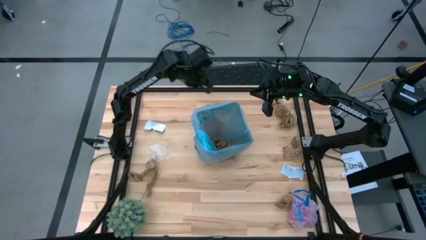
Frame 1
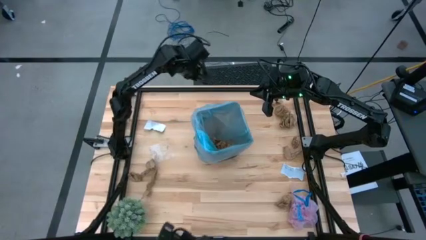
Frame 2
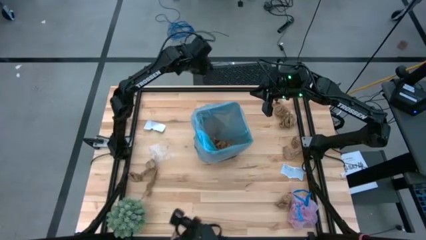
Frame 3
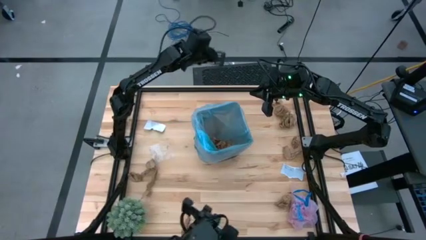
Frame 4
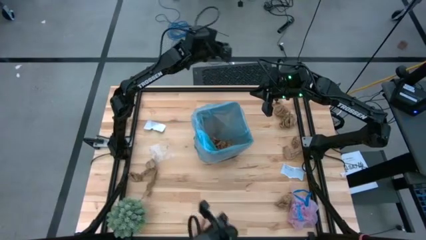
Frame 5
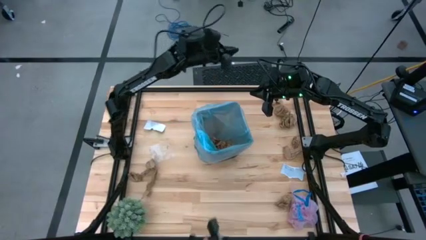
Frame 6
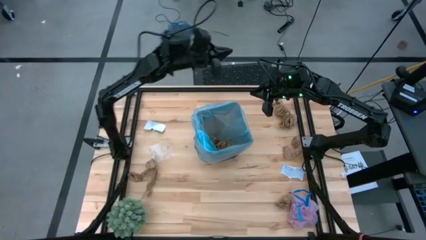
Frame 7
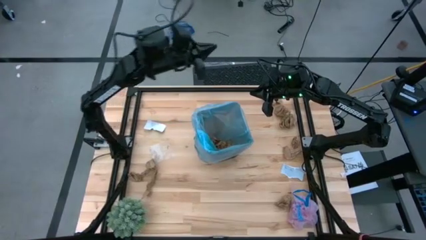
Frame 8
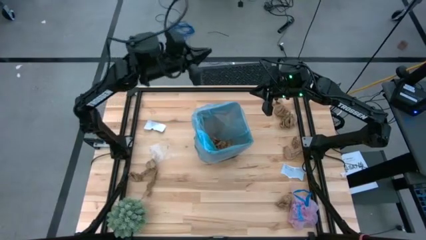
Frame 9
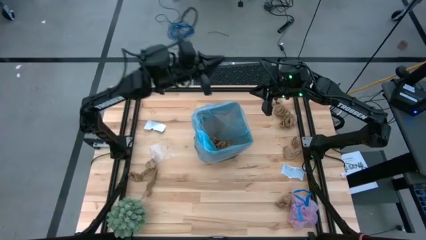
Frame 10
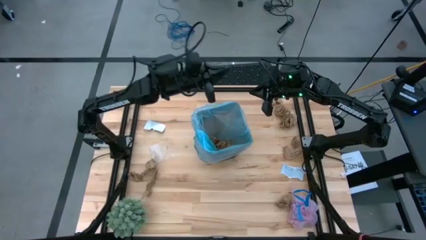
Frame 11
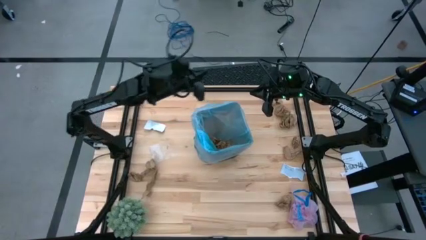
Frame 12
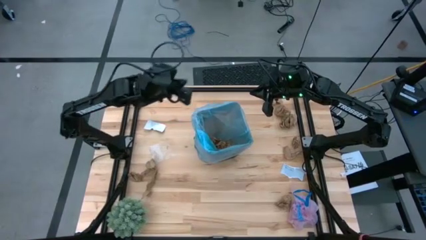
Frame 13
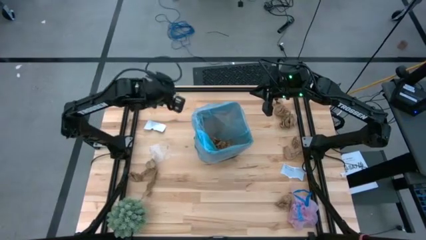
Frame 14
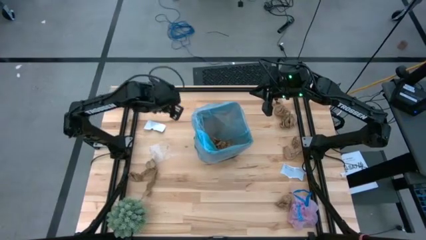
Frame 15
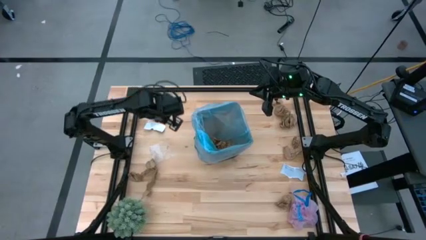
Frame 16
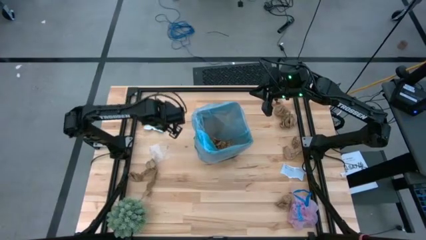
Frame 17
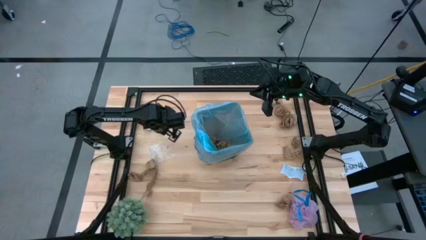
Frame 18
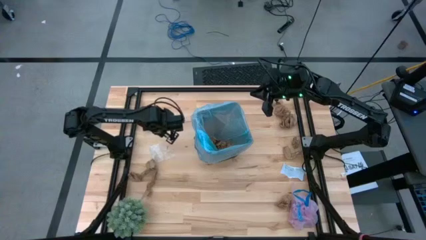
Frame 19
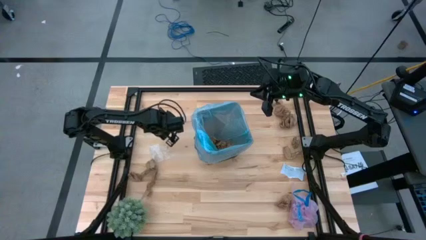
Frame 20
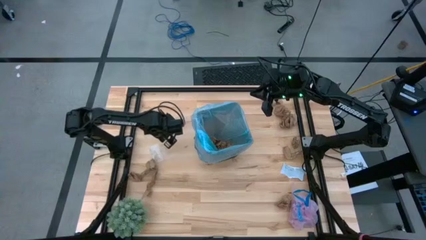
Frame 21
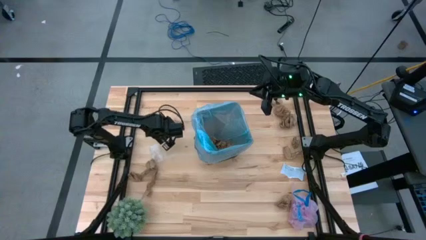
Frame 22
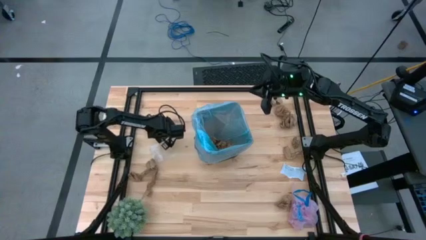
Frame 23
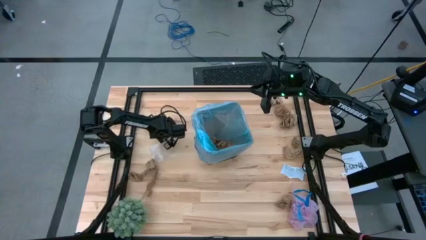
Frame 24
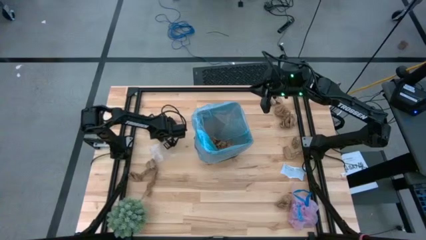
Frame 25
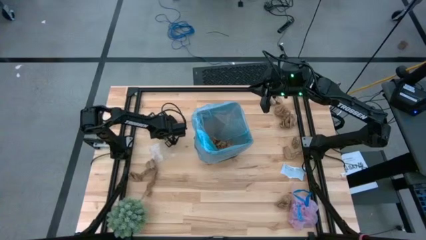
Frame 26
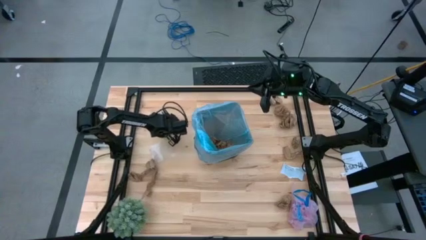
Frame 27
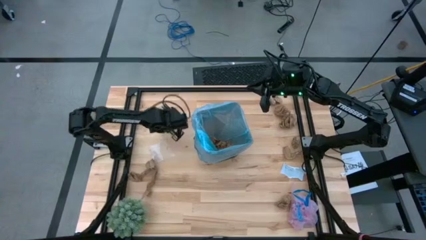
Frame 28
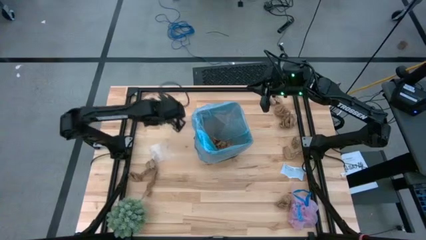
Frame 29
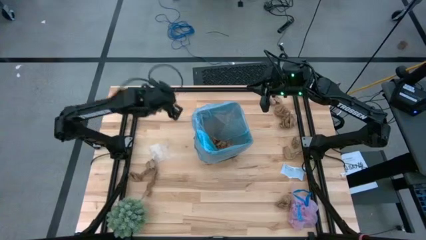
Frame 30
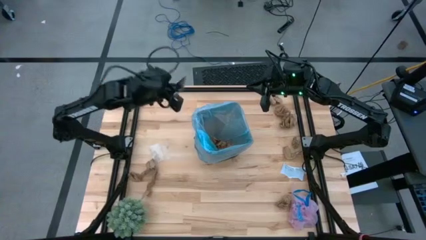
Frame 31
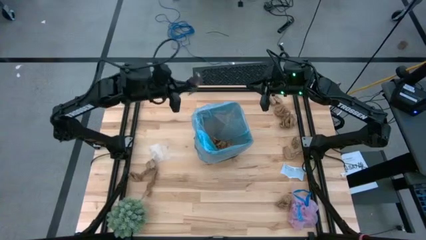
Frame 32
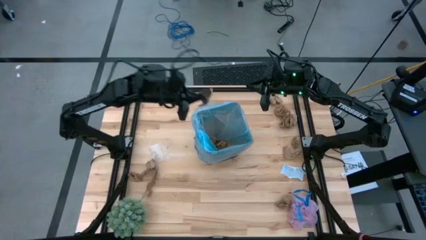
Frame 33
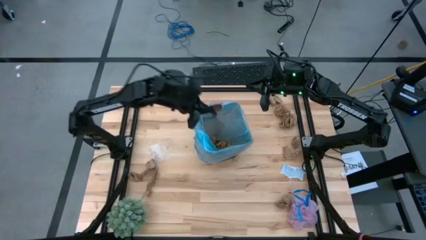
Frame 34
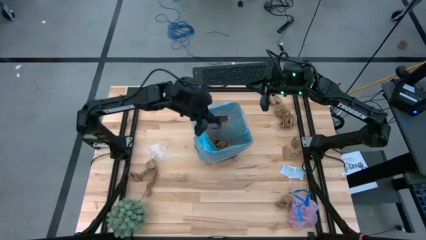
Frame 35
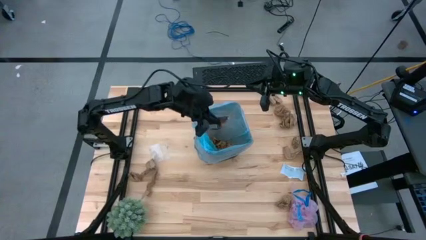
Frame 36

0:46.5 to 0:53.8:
Task: Pick and place trash into bin
Put the white paper into the brown trash bin

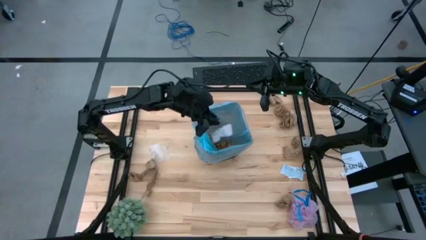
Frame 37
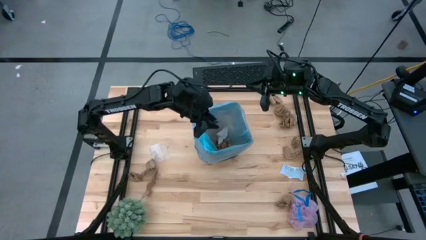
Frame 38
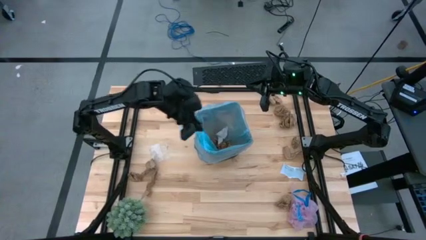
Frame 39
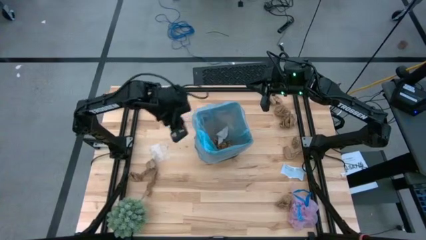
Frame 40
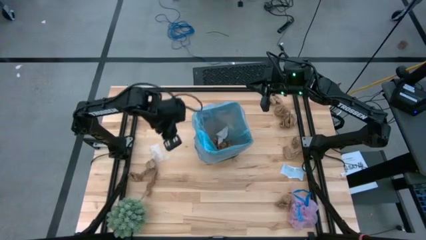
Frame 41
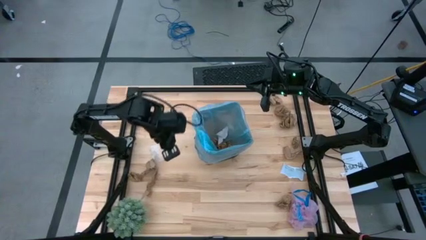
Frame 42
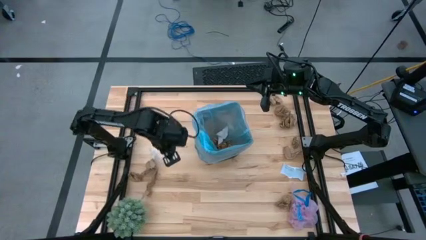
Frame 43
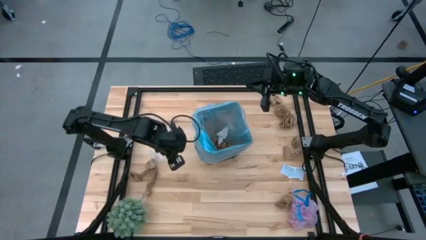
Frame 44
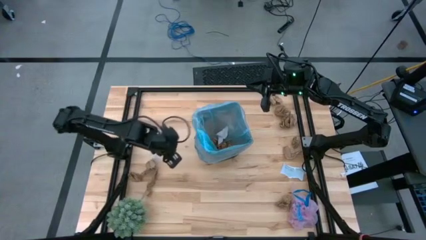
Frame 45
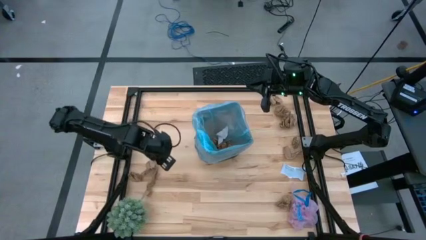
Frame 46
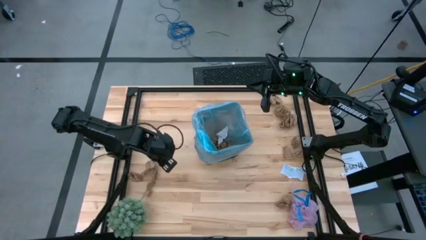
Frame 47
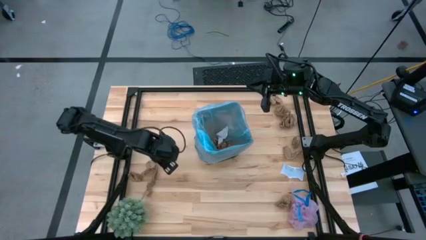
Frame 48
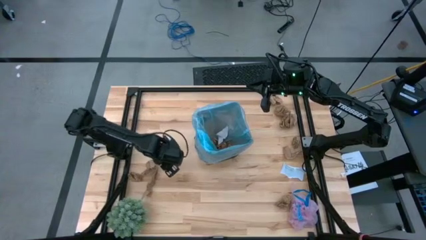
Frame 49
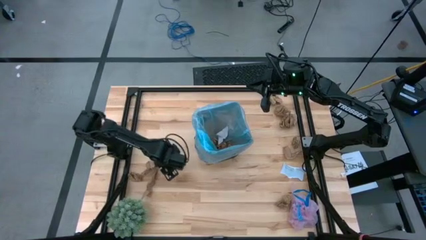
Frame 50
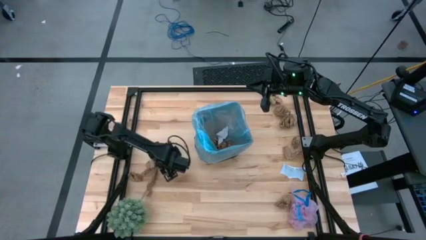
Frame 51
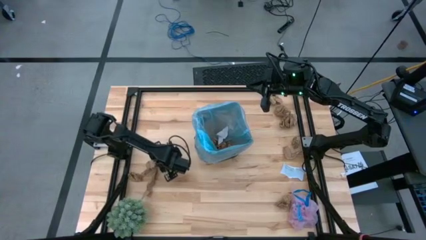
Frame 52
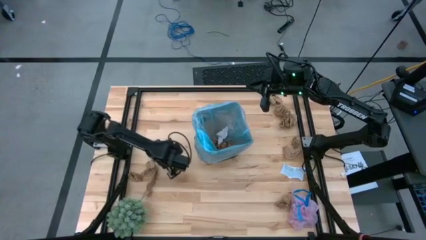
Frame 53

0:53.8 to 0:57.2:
Put the transparent plastic into the brown trash bin

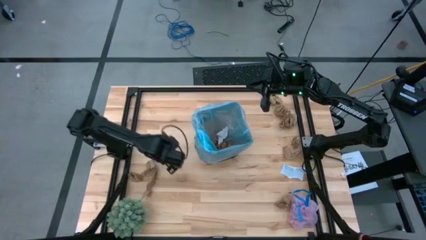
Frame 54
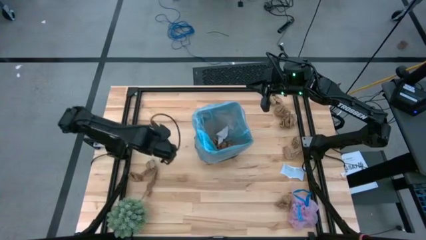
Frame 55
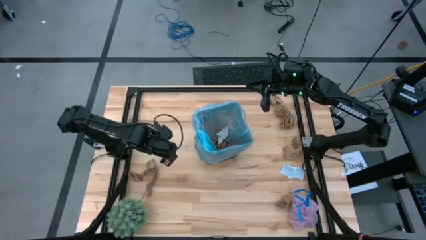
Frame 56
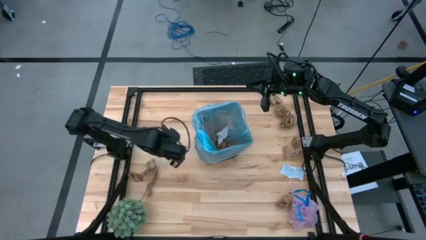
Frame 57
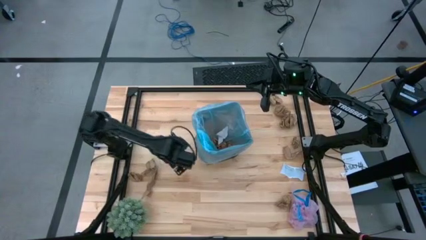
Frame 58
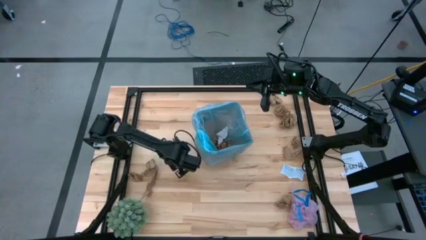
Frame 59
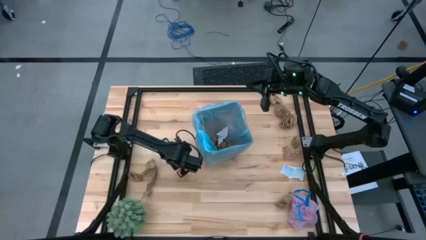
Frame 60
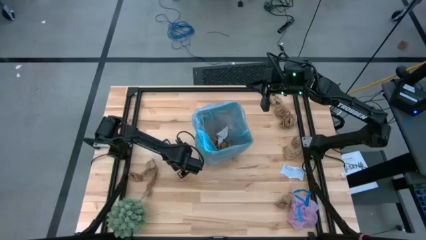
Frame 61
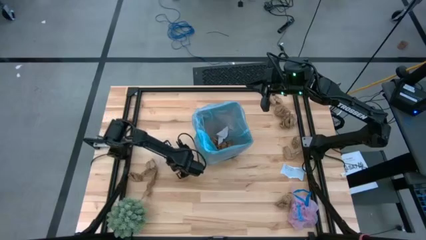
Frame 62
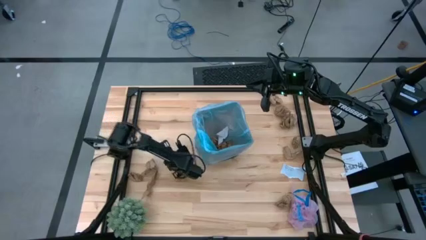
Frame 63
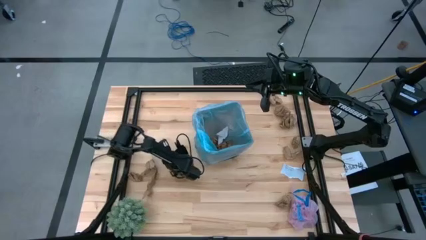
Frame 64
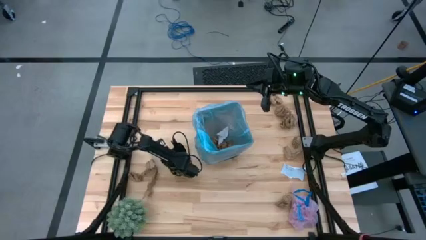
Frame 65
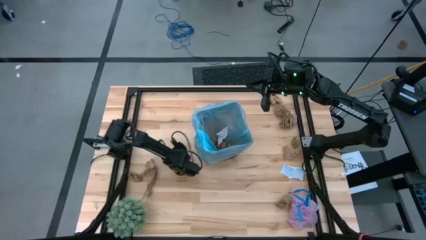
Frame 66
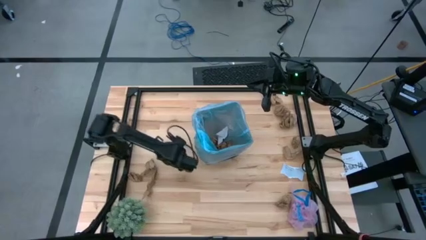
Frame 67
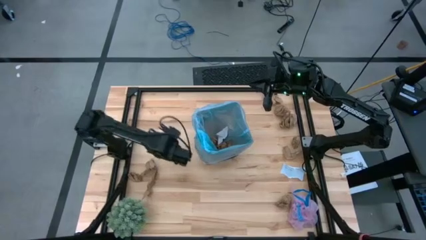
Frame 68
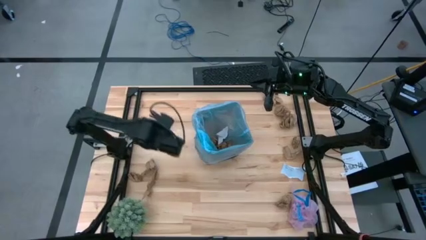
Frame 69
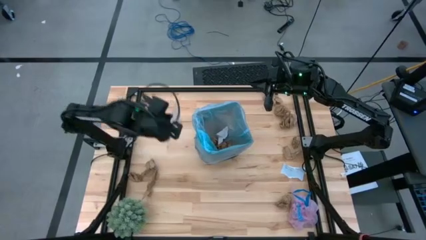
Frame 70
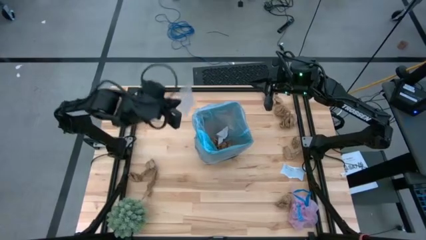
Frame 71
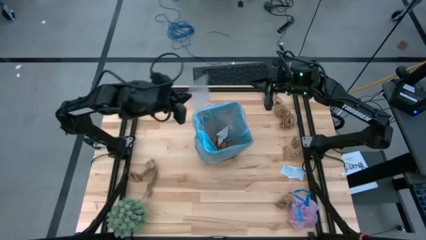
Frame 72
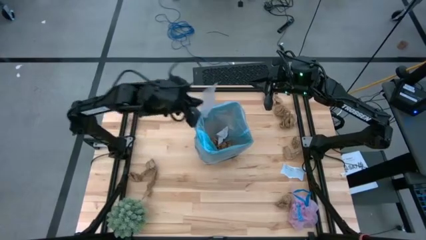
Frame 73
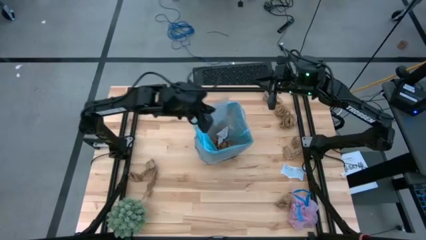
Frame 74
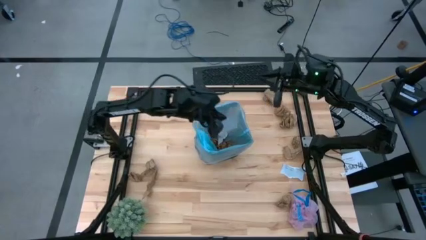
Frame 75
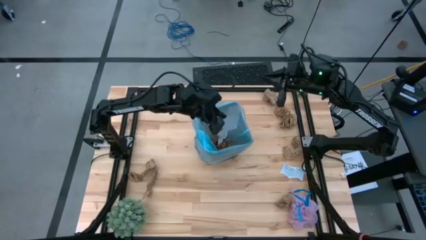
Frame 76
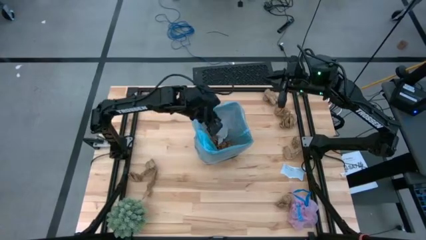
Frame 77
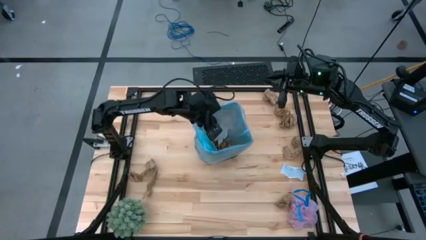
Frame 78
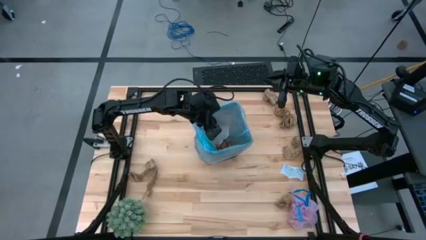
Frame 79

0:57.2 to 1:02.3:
Put the transparent plastic into the brown trash bin
